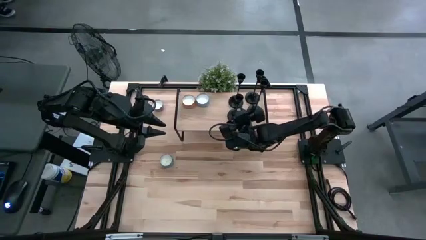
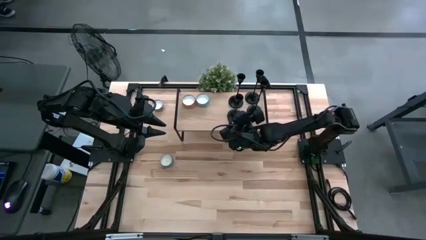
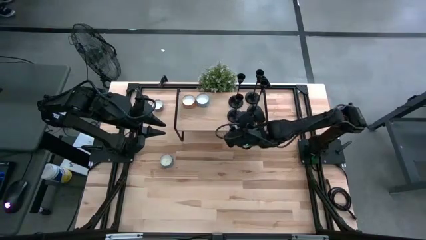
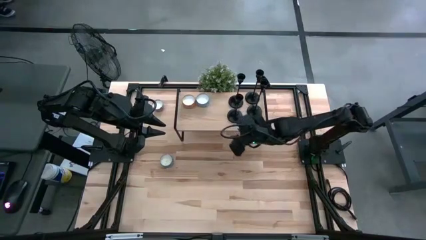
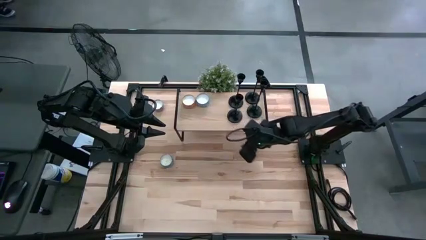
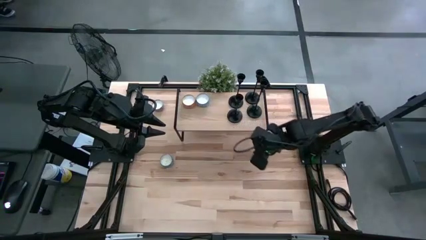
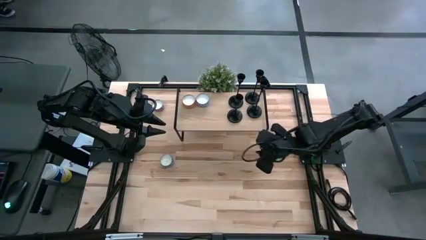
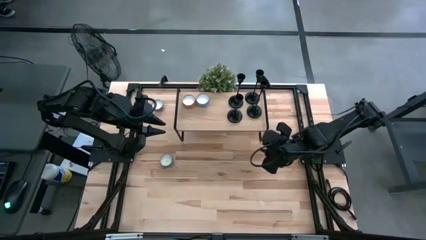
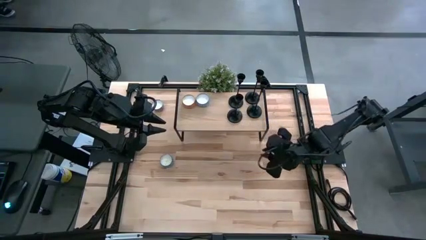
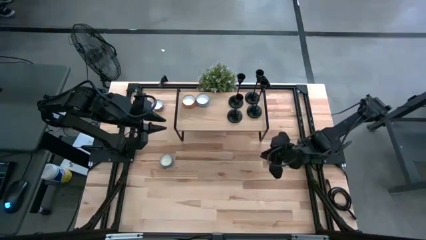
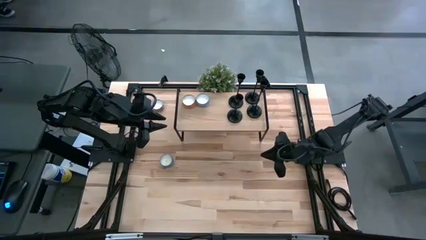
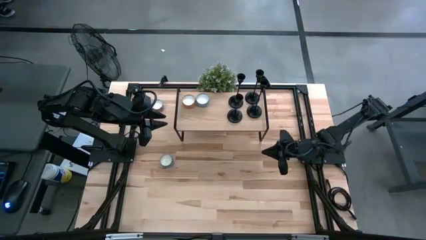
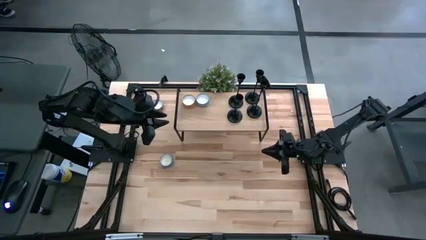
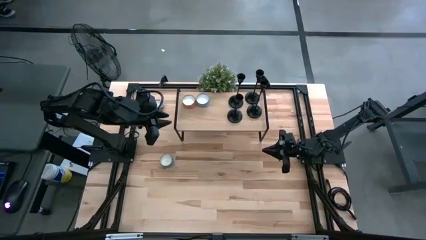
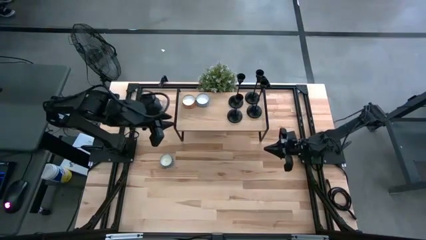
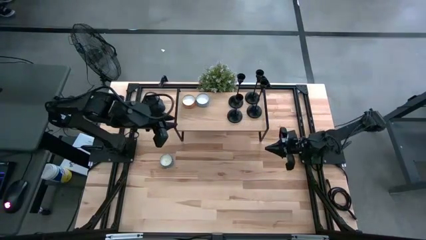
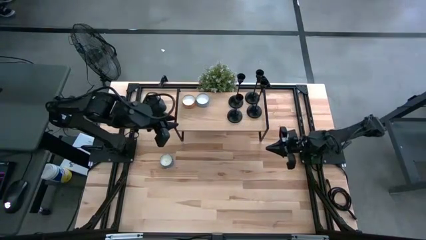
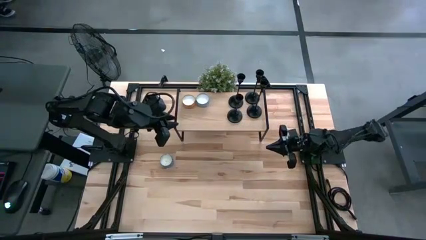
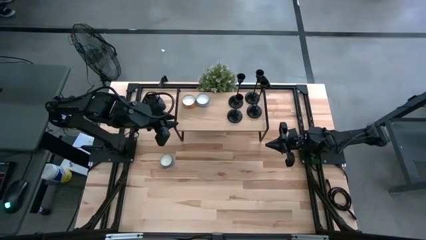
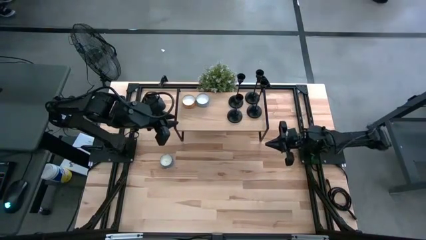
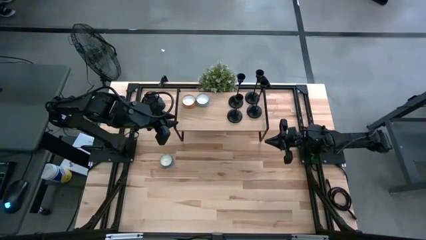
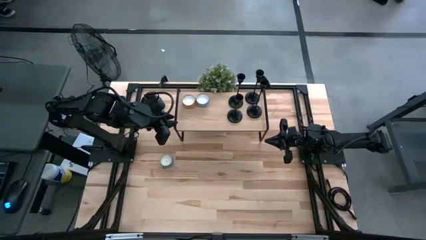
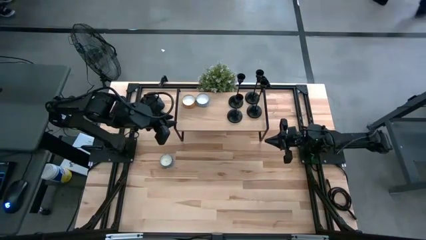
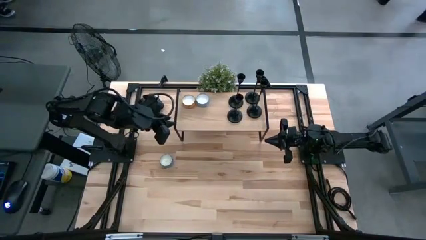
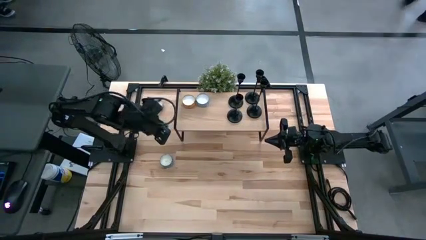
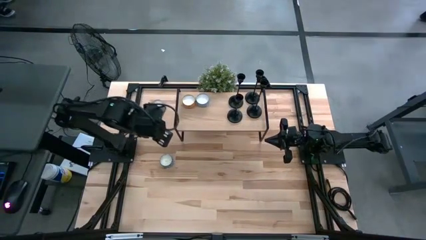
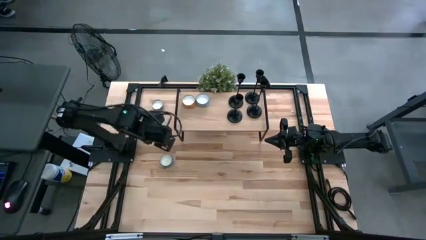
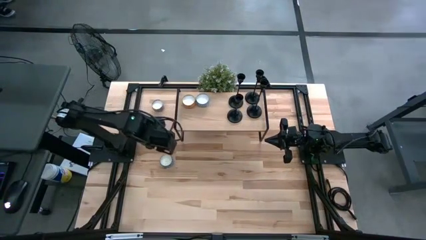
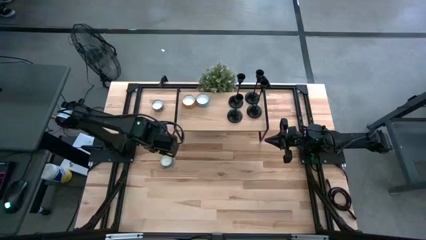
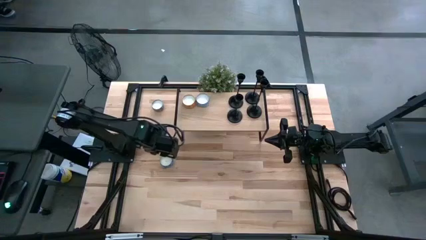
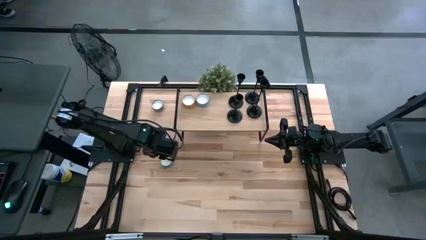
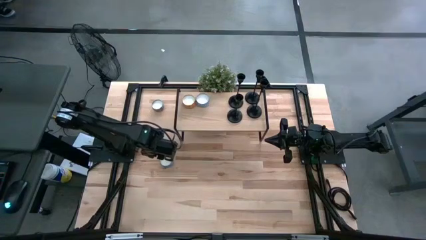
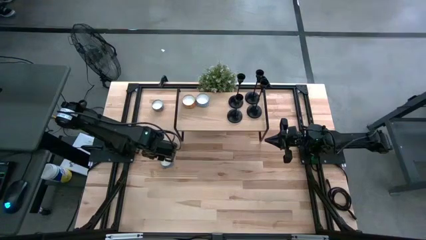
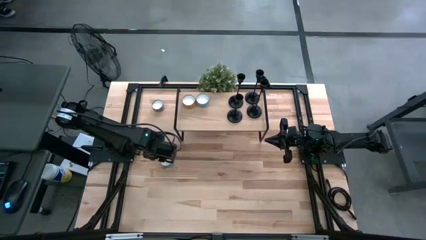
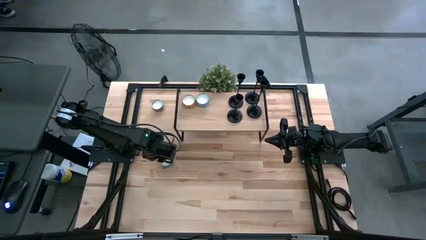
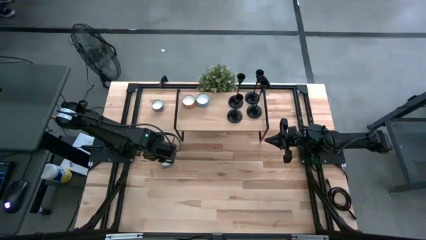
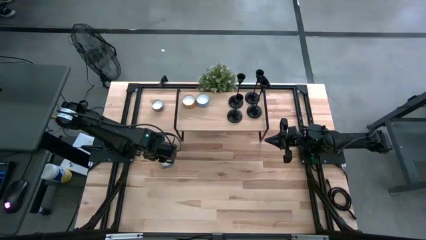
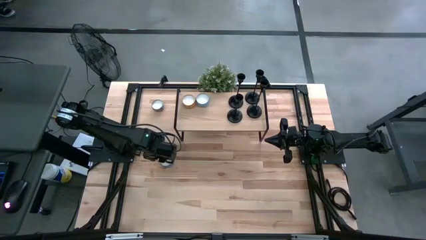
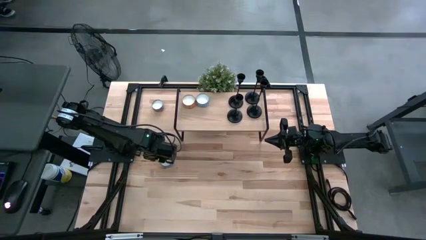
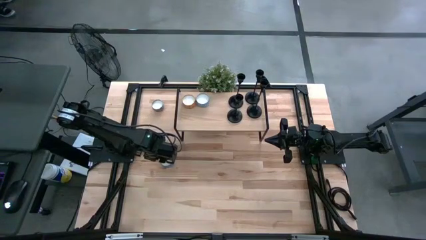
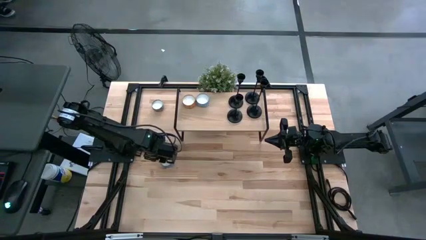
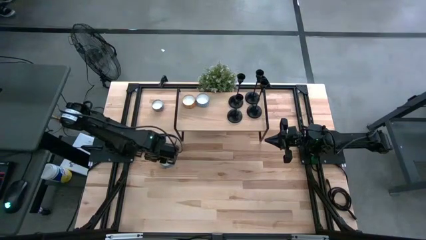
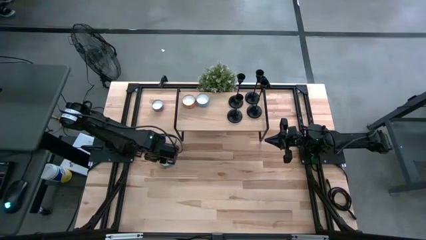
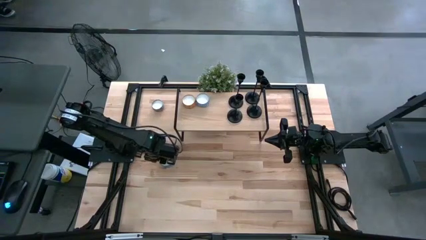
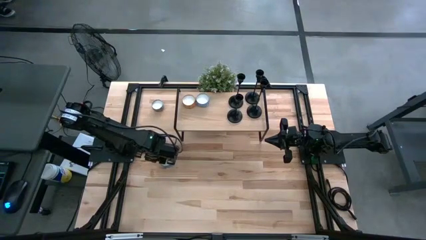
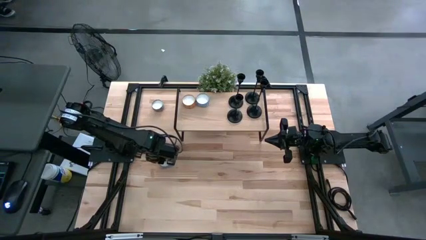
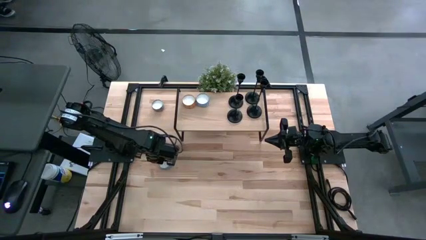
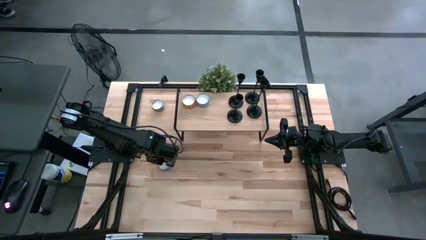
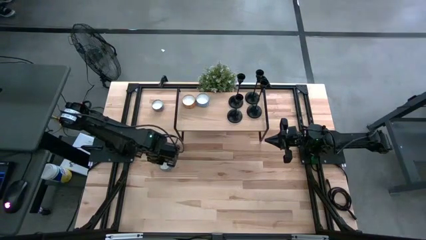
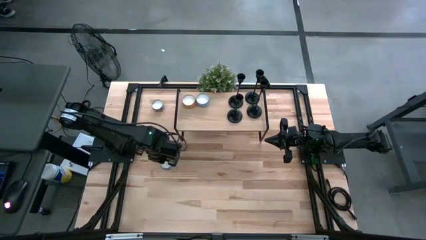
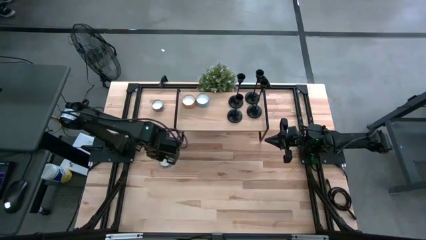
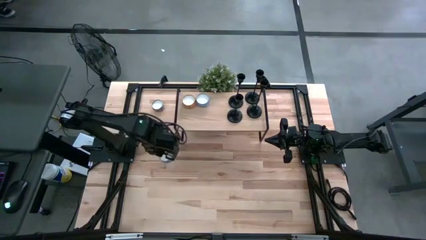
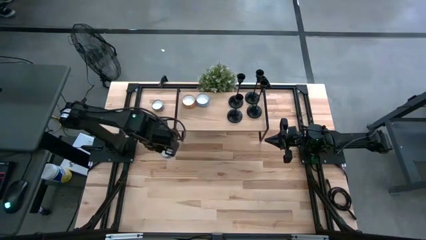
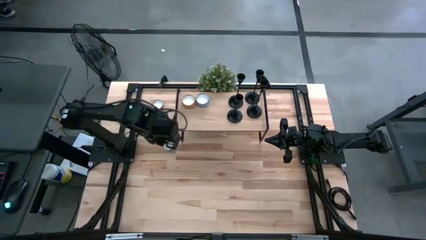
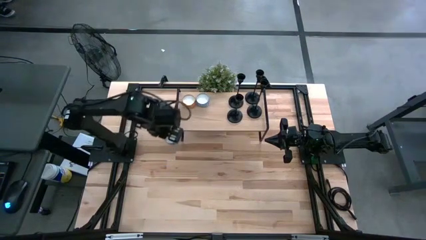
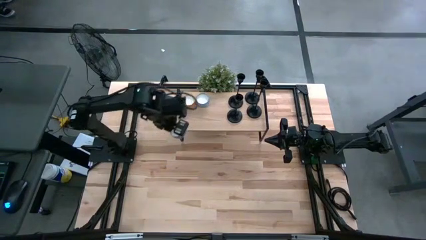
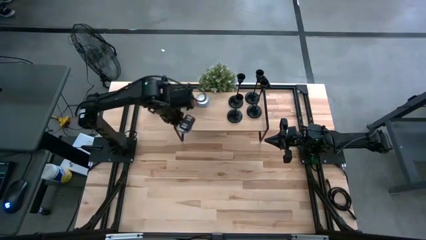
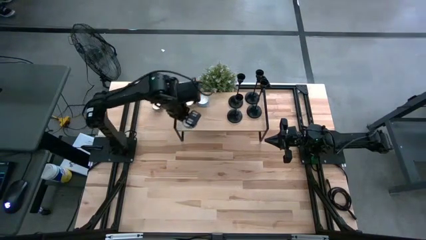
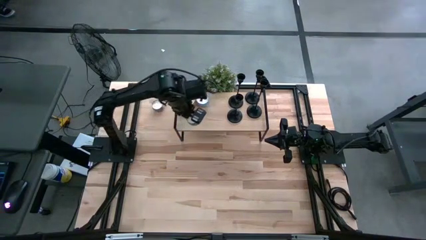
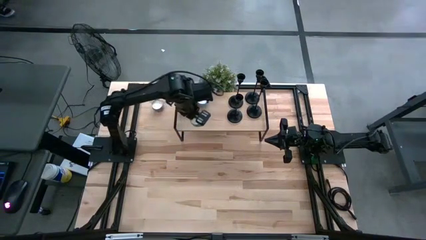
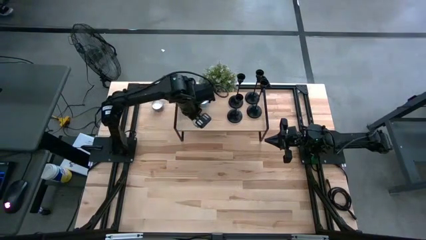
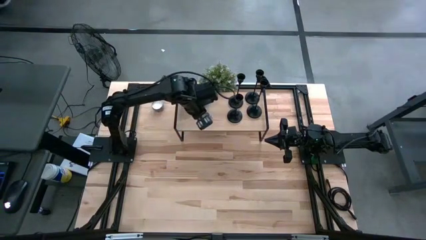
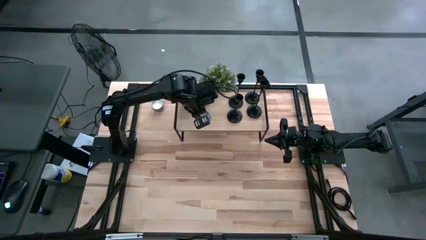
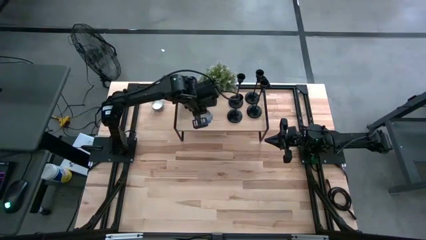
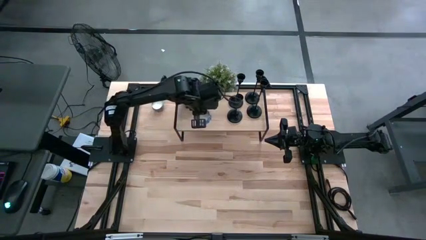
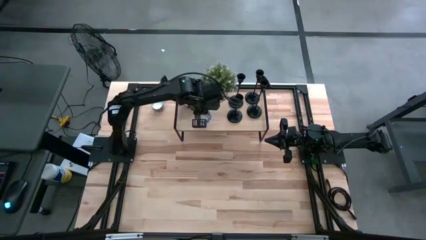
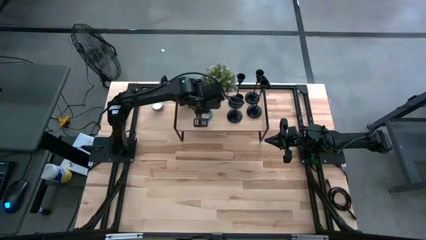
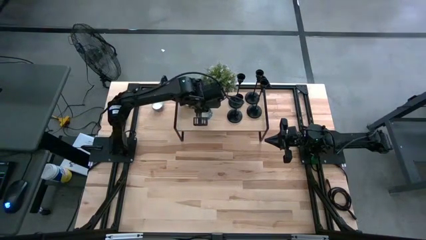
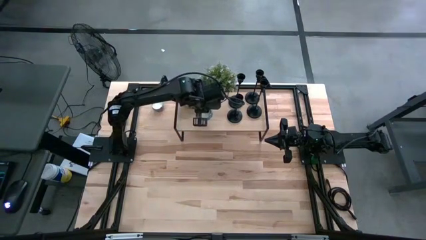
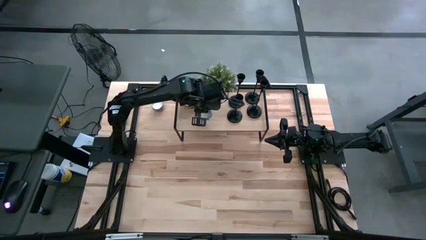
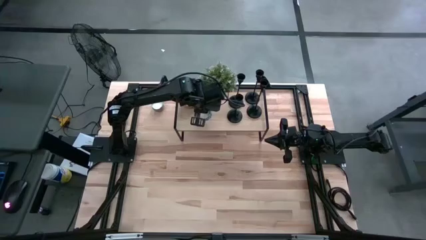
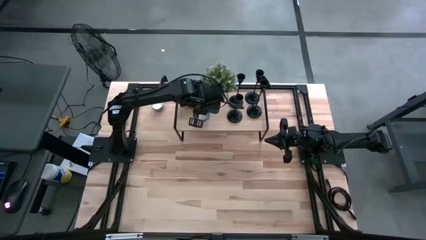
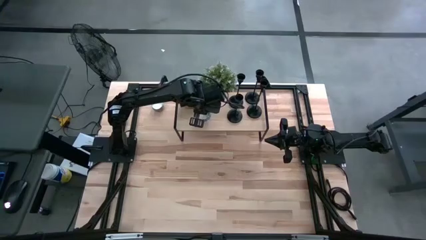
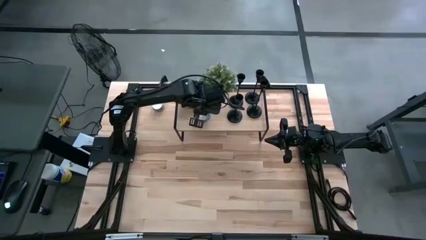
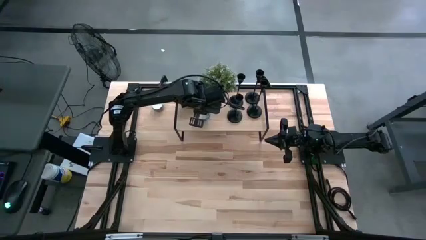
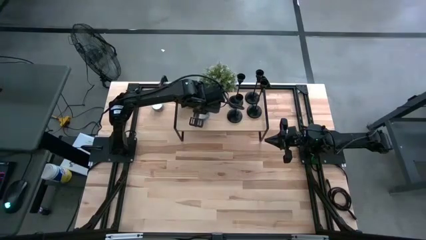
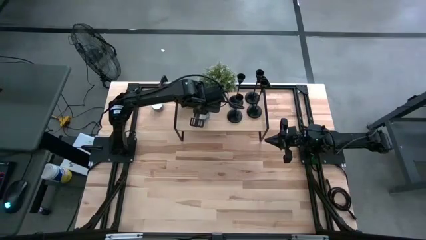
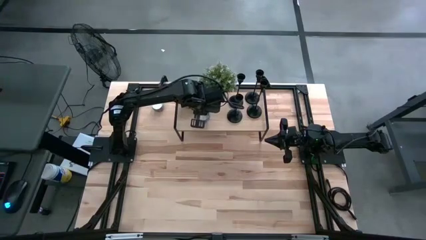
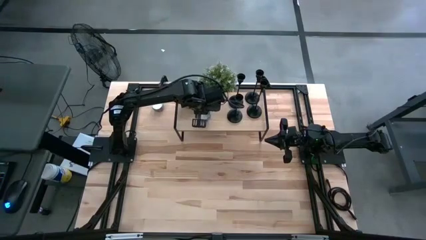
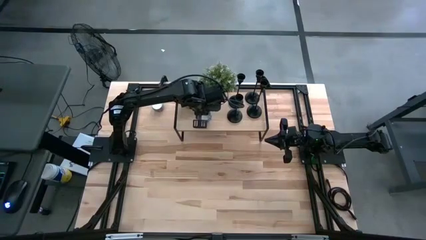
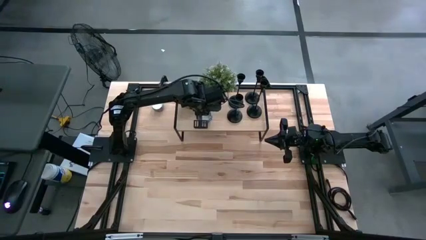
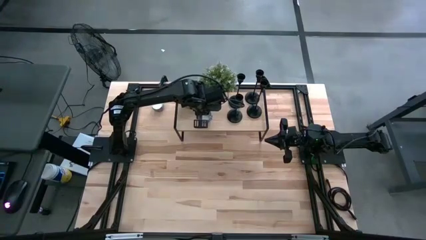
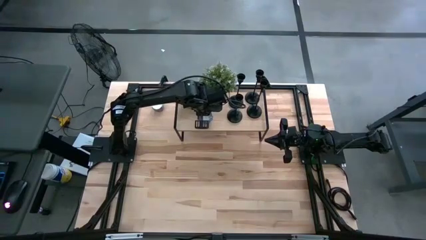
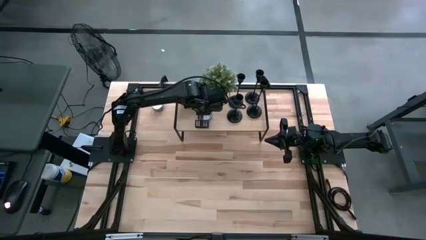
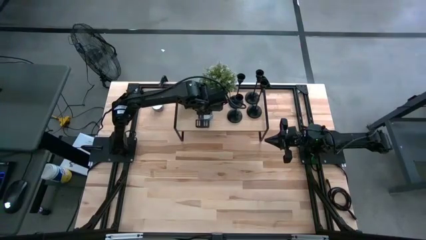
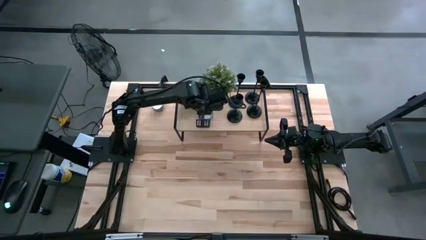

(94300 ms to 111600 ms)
Task: Pick & Place candle stick holders
Put the blue scented candle on the shelf aligned with the blue scented candle
